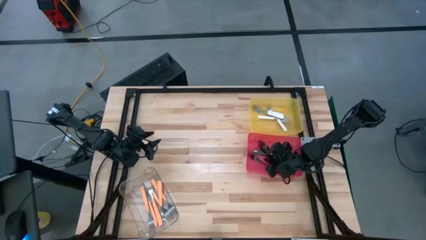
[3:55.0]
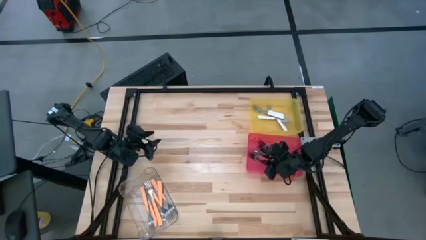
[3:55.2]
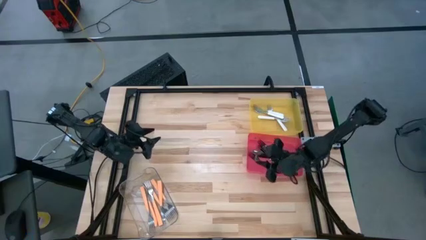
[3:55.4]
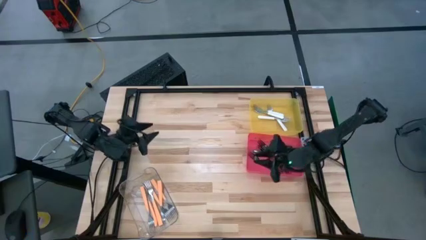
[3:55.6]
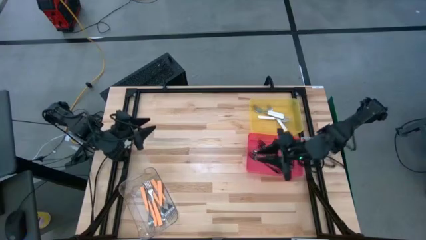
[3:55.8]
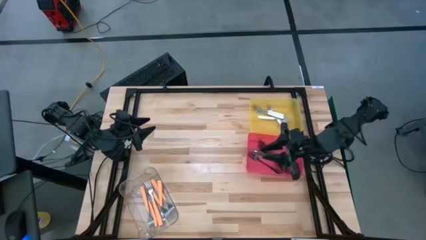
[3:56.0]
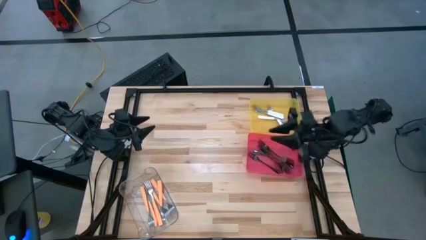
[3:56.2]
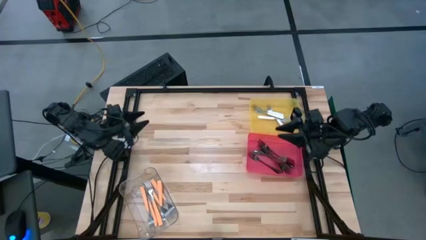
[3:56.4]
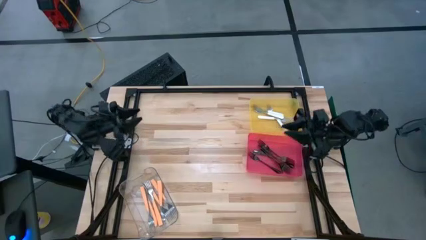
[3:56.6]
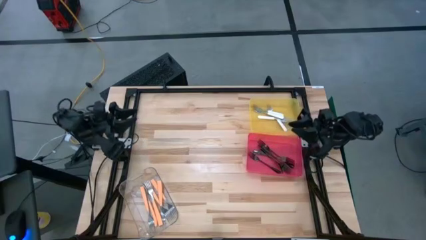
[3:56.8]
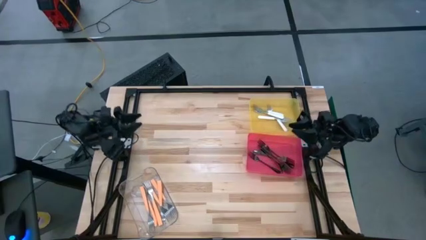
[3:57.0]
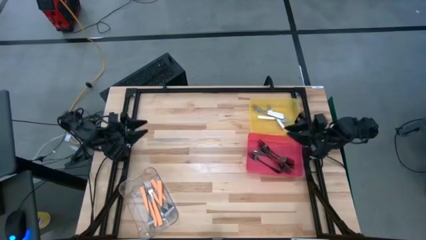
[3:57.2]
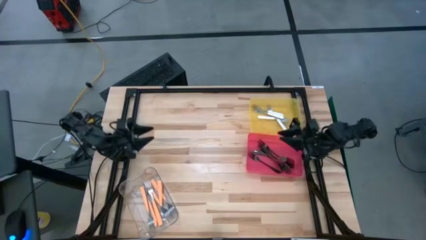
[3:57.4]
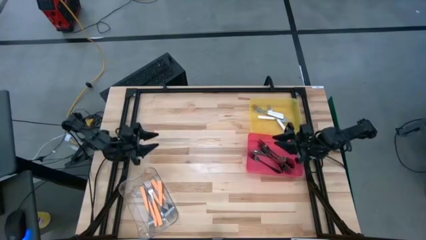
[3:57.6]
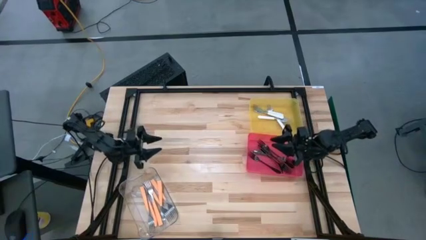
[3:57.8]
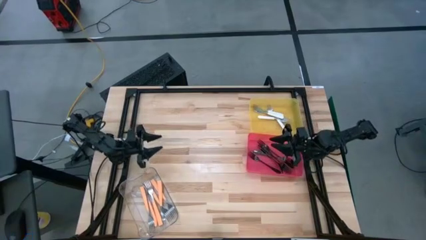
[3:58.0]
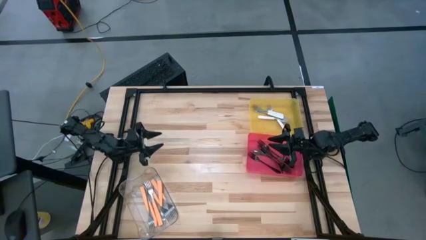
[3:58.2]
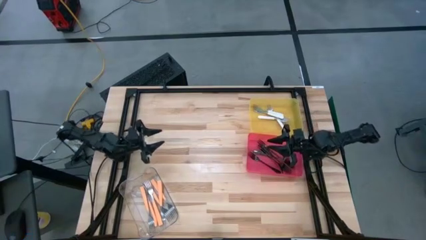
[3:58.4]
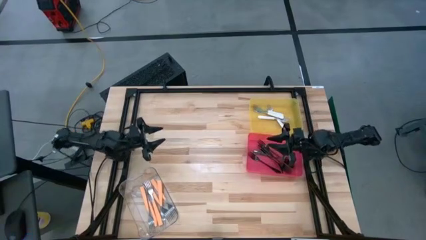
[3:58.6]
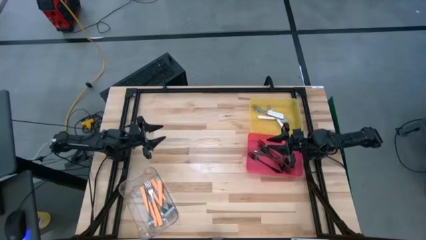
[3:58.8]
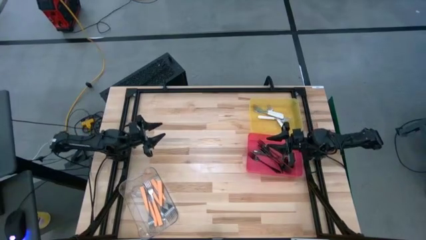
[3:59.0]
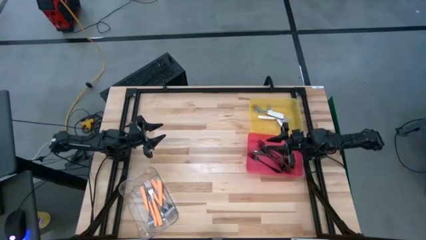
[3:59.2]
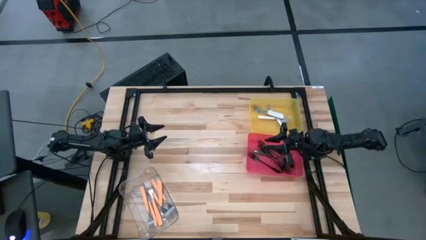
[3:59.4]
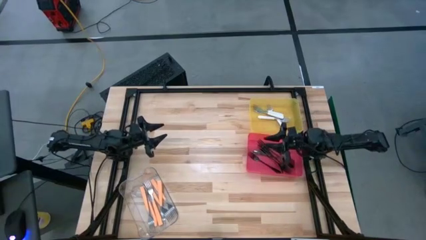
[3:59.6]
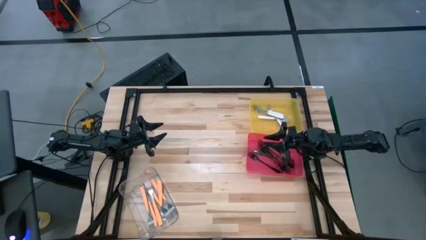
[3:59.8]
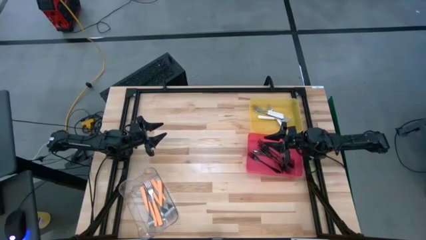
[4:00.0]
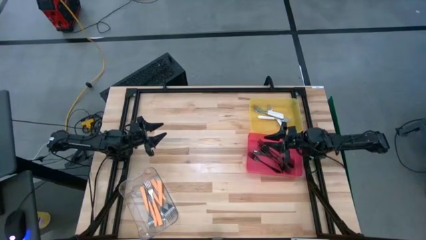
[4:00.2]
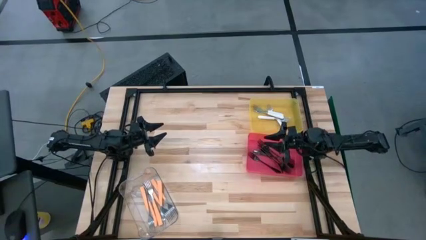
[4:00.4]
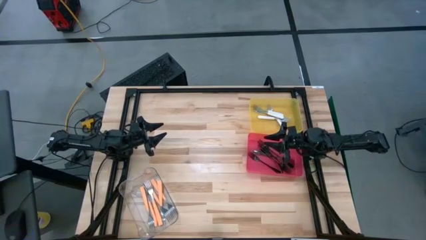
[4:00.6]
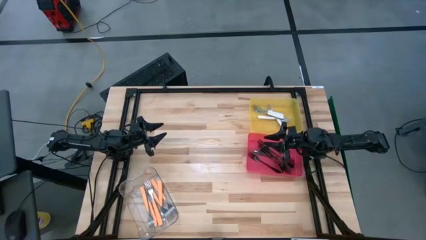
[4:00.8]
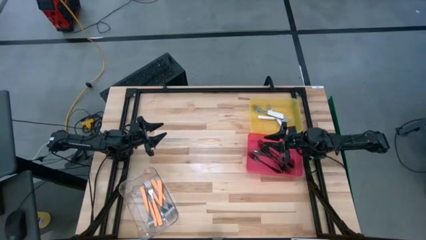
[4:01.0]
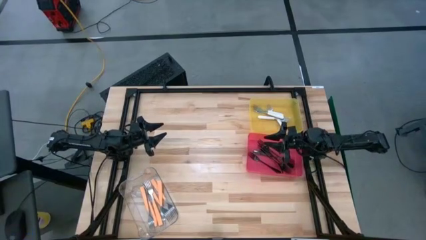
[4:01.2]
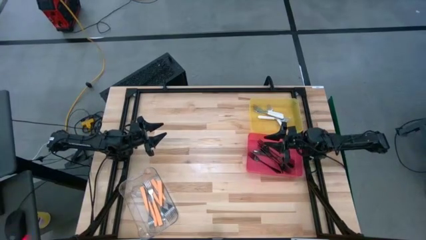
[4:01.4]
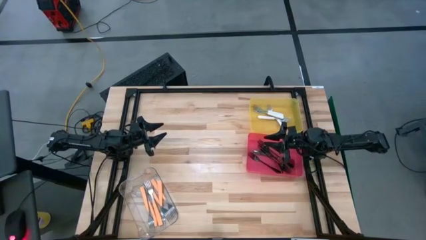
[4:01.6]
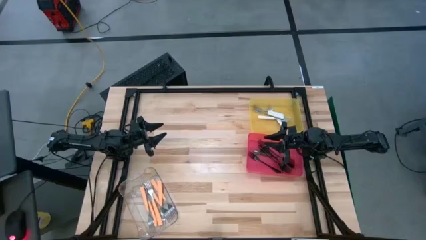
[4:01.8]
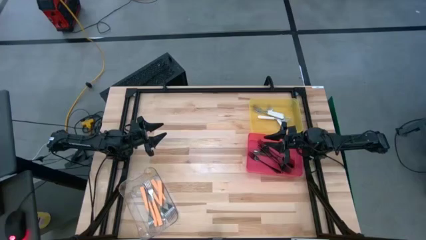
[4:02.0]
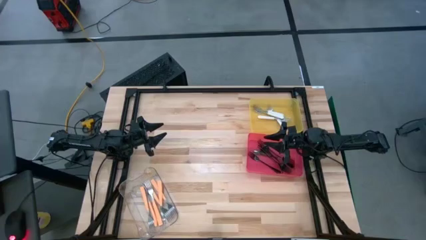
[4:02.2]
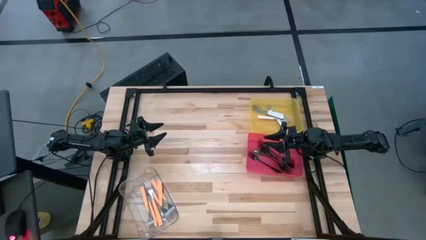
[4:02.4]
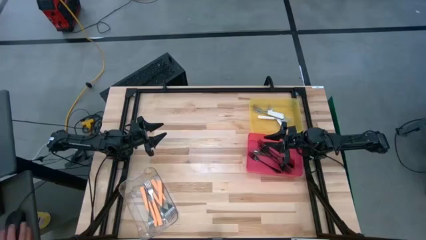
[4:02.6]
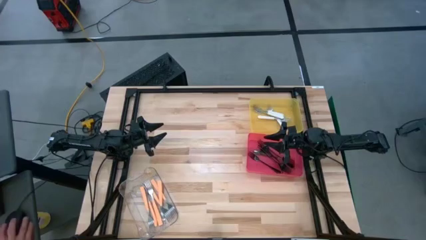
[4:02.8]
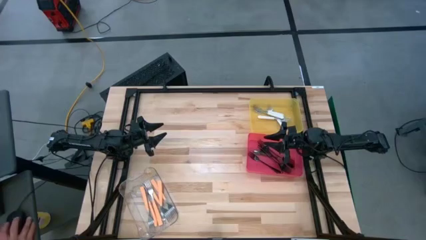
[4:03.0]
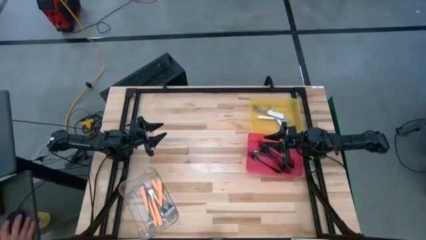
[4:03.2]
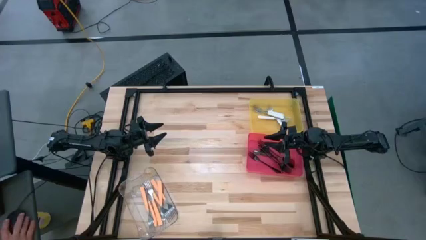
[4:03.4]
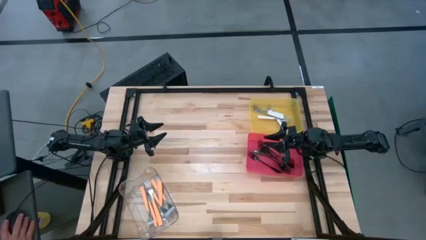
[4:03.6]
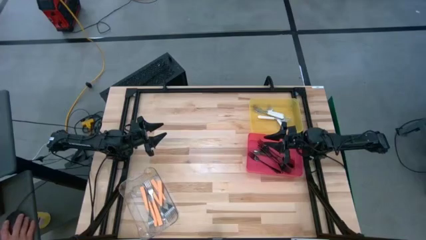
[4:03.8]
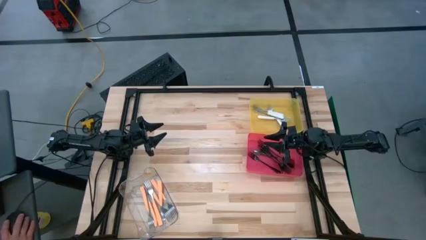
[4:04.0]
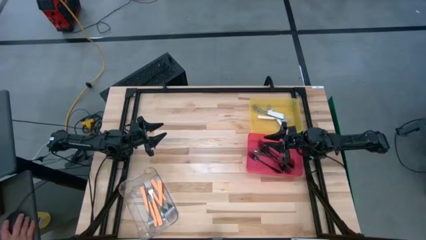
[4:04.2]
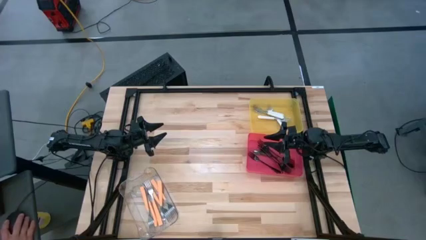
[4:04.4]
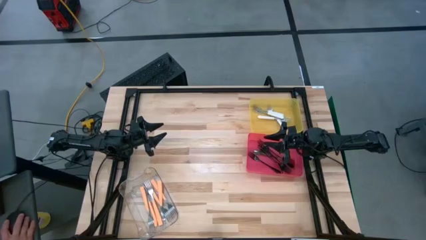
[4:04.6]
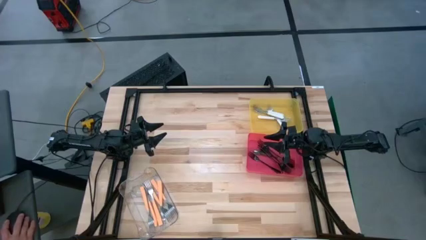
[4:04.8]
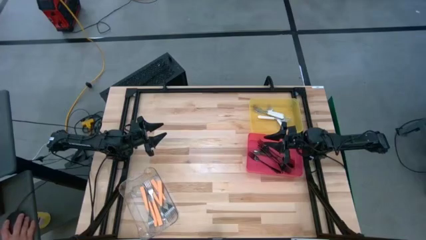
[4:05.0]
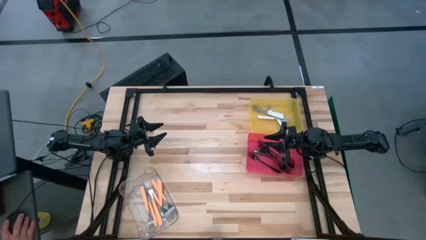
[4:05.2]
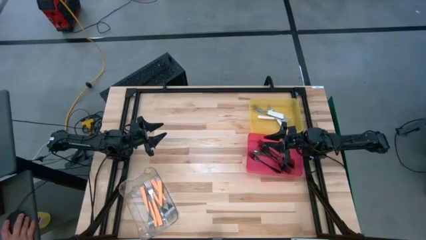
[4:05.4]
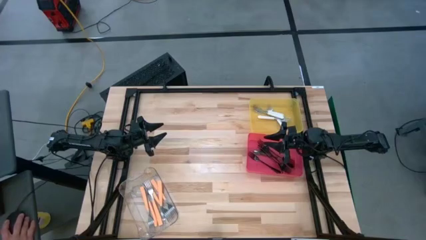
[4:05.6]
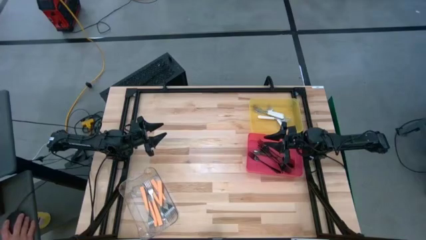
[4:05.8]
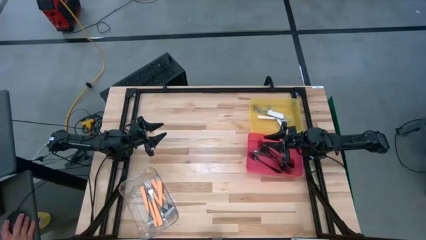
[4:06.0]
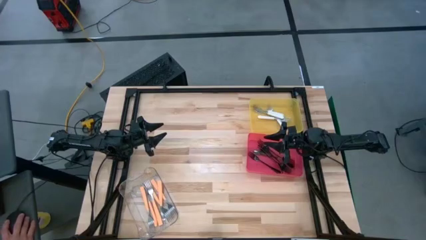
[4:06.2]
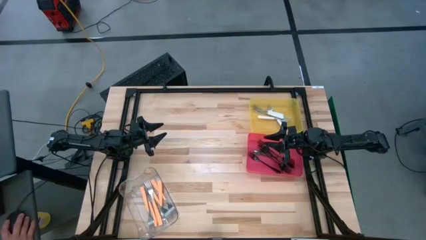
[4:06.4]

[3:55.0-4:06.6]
Task: Sort silverware by color (type)
Return to Home Position

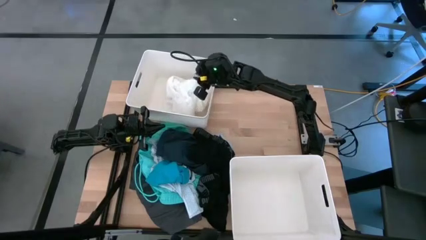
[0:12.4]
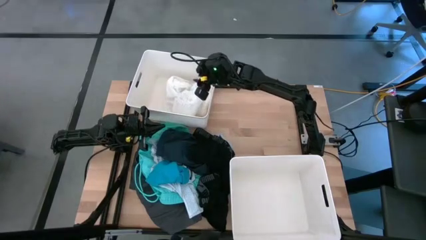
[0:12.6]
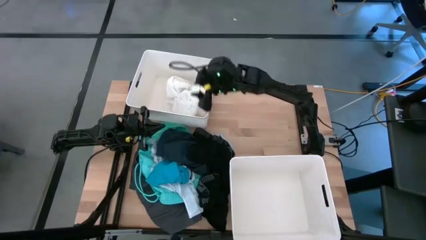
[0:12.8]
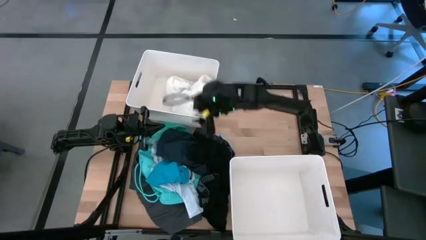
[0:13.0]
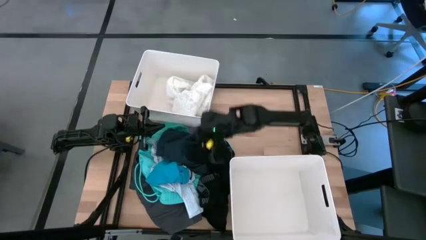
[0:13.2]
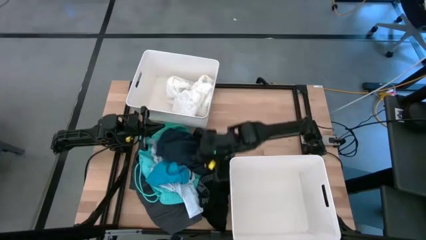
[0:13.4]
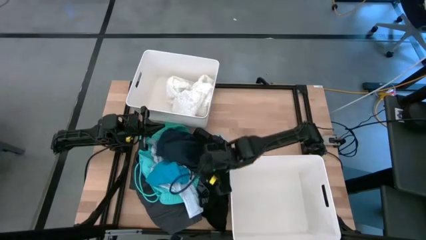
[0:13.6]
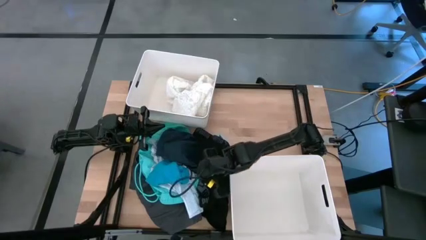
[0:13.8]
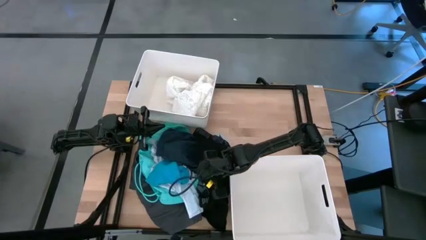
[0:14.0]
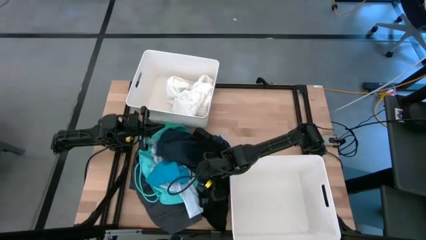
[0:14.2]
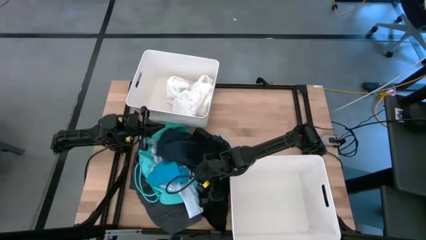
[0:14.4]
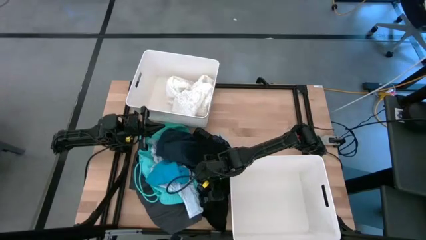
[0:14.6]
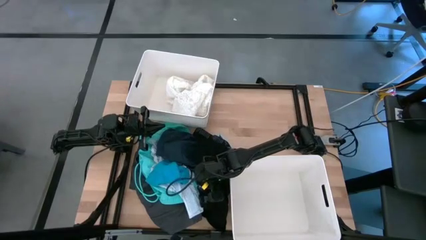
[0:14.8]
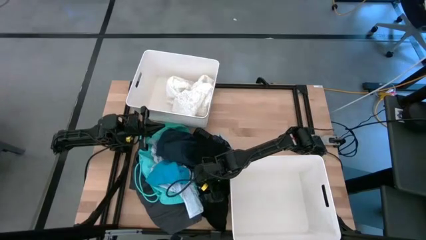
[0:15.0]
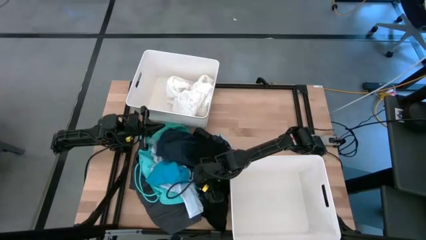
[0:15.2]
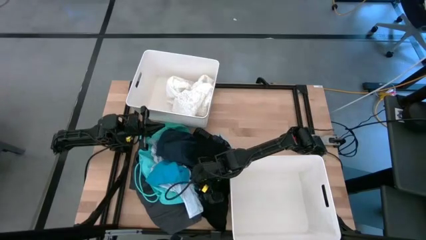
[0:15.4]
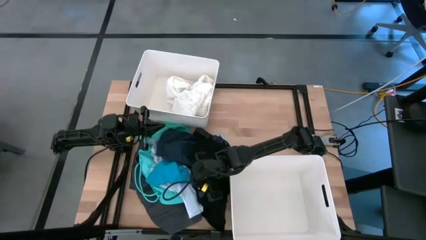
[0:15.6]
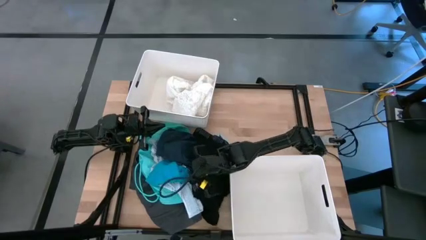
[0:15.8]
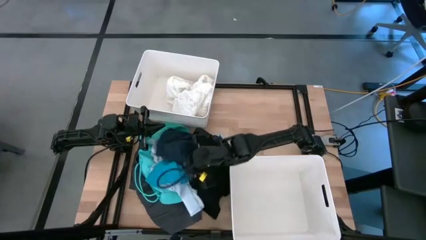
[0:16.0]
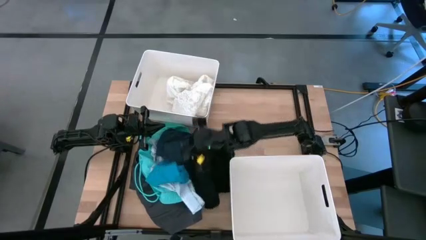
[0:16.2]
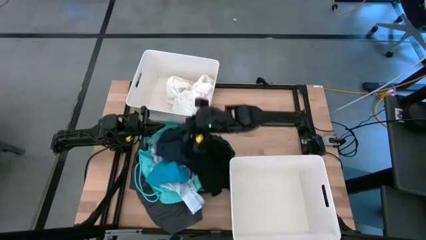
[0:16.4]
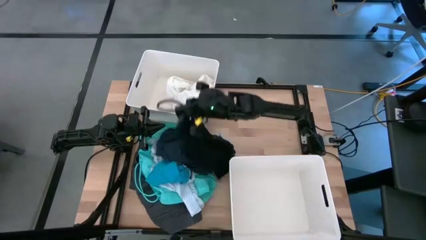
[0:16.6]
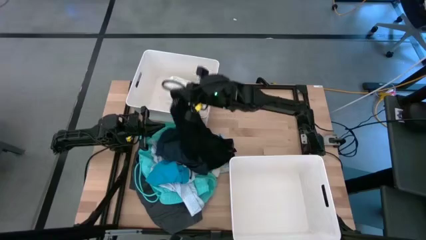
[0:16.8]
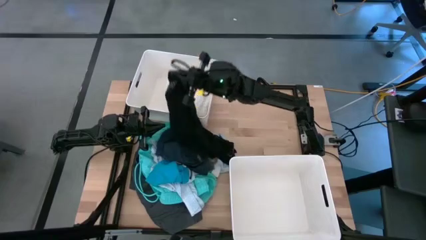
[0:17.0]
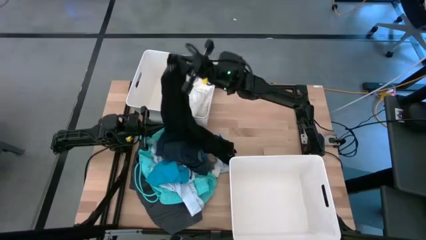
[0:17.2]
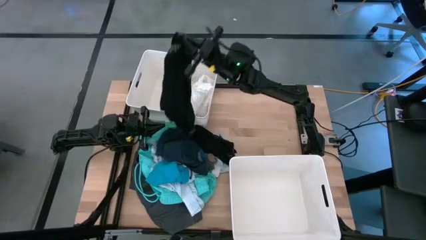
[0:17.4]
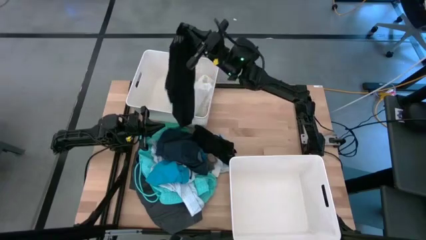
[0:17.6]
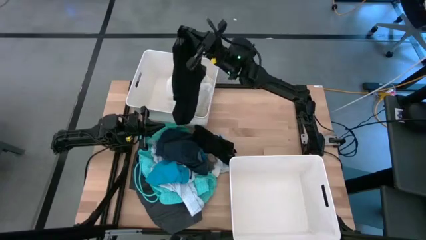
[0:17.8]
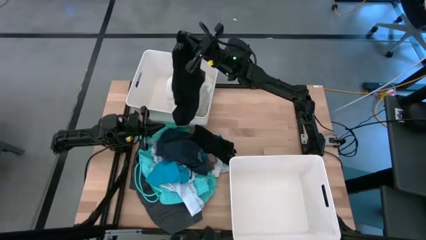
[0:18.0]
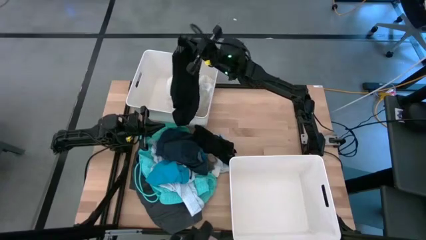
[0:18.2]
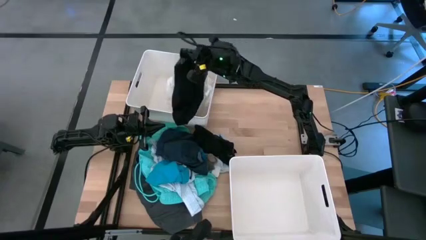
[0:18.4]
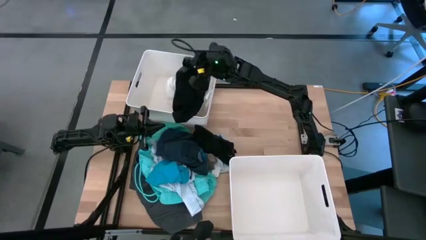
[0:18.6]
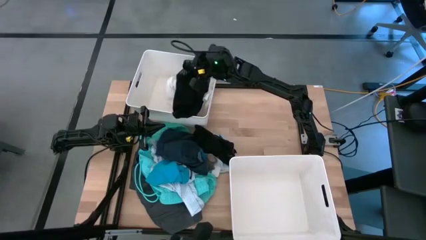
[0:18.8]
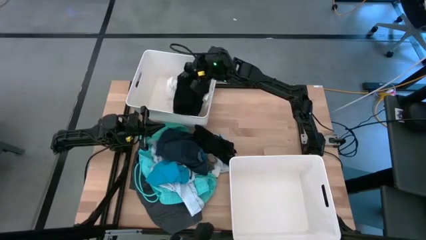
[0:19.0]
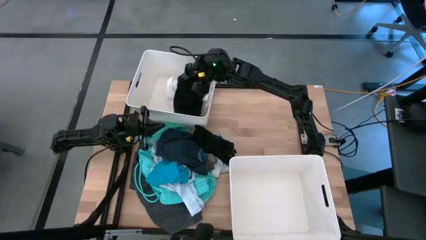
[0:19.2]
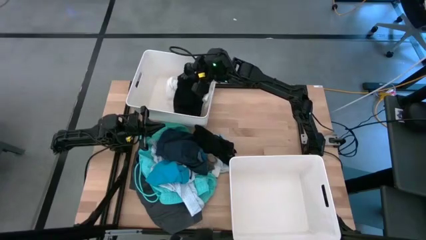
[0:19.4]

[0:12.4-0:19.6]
Task: Sort clothes
Put the black boxer into the top white bin
